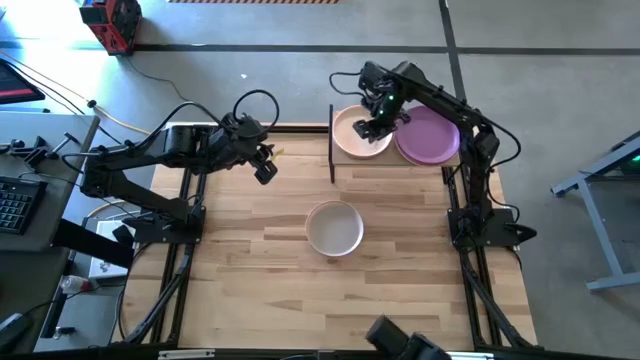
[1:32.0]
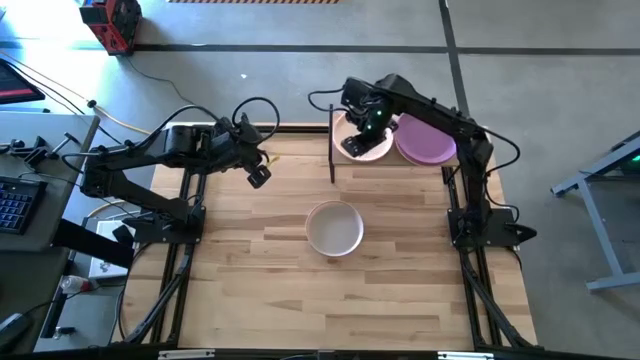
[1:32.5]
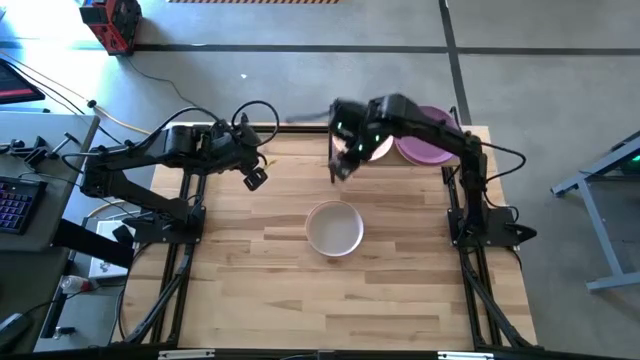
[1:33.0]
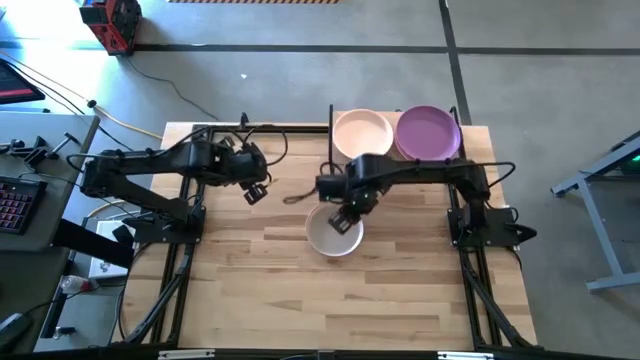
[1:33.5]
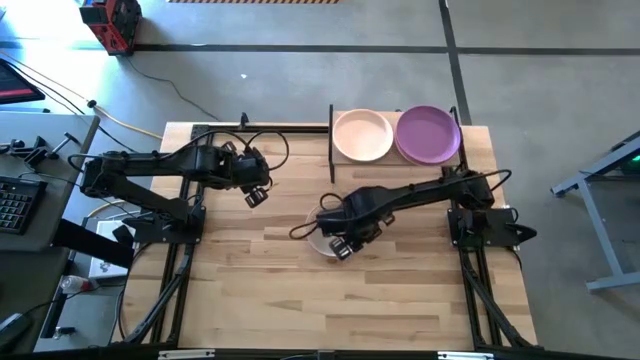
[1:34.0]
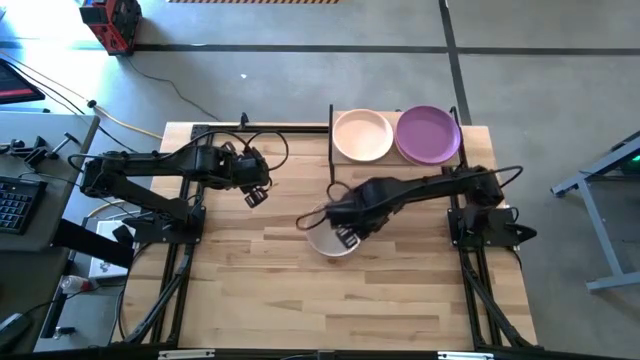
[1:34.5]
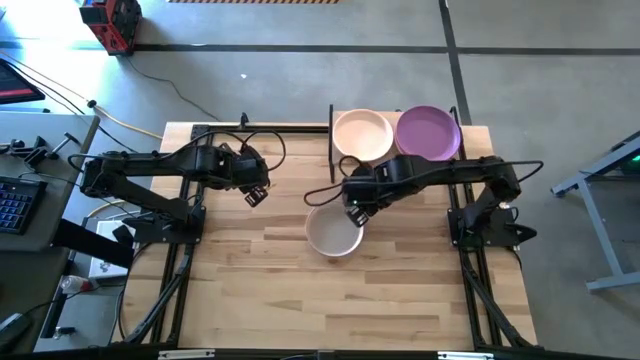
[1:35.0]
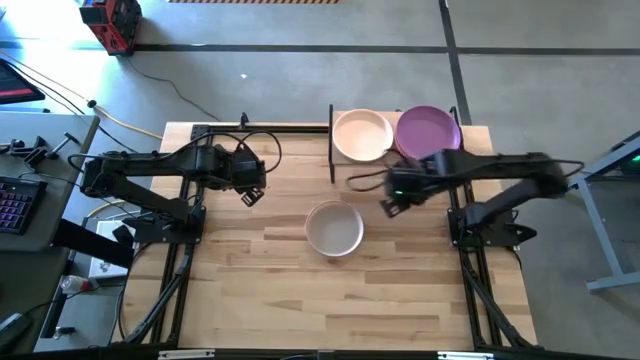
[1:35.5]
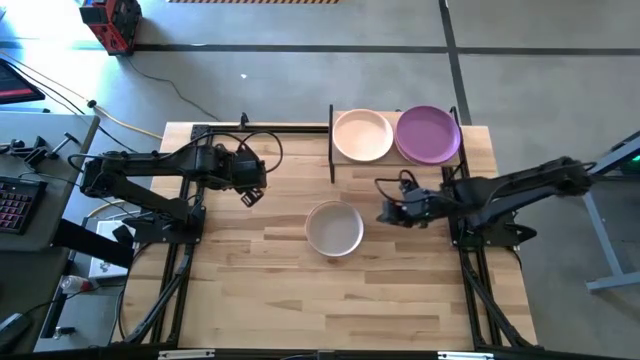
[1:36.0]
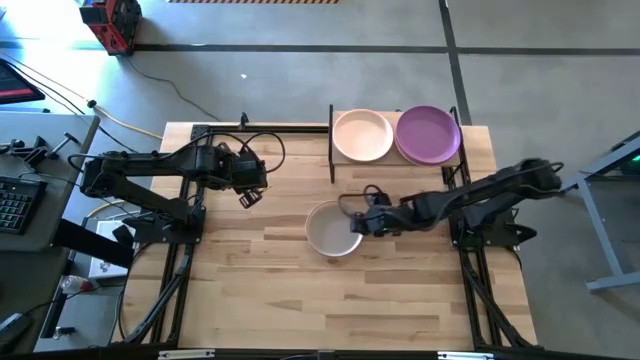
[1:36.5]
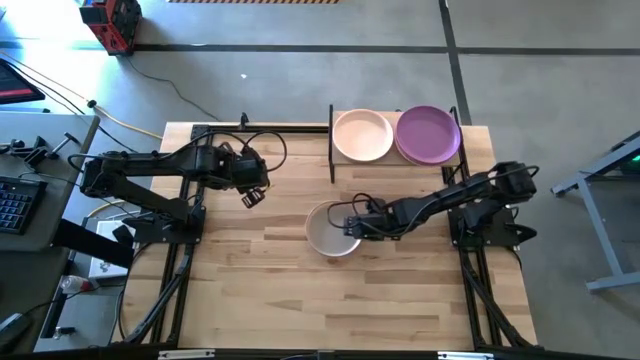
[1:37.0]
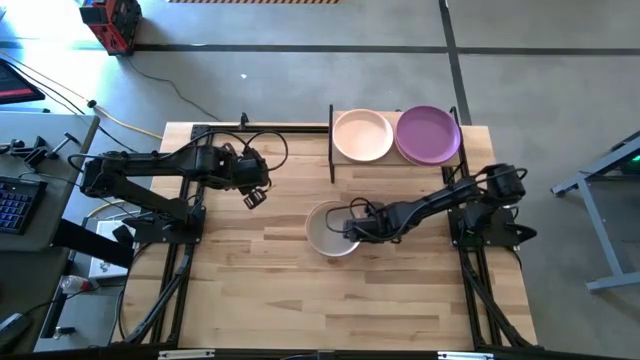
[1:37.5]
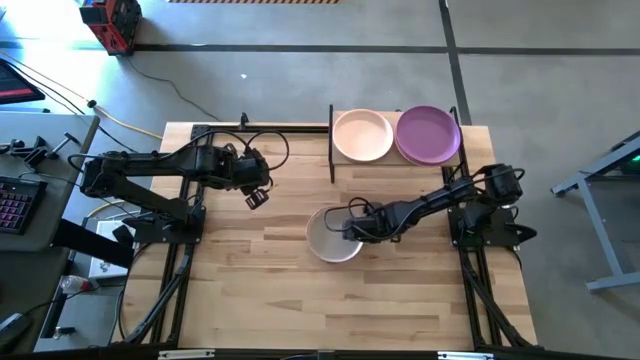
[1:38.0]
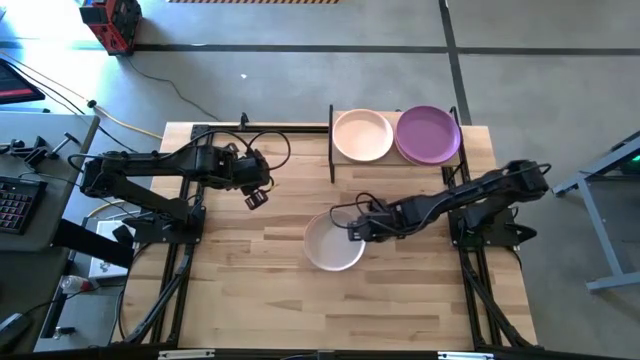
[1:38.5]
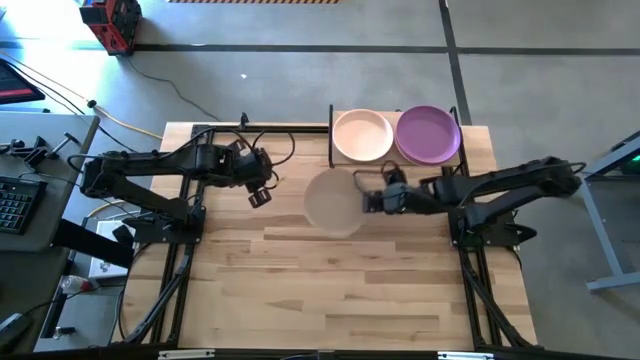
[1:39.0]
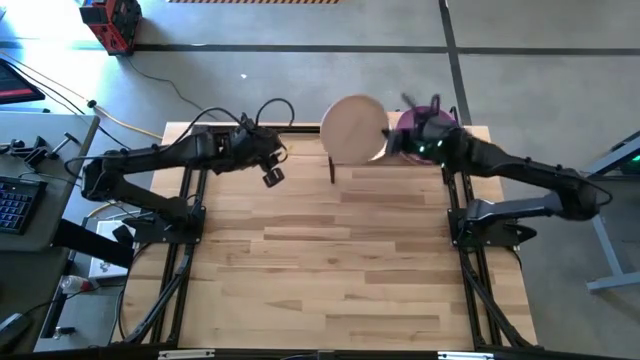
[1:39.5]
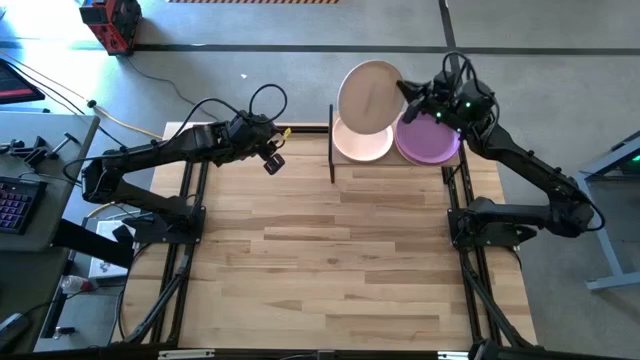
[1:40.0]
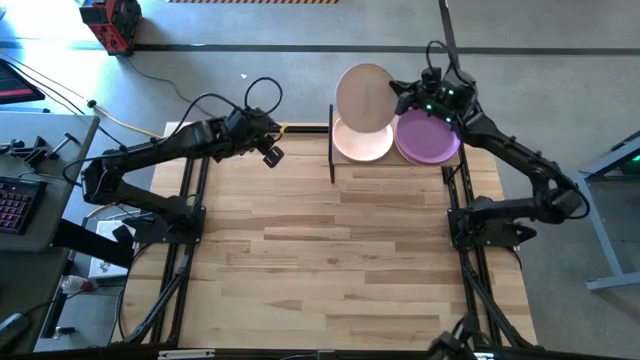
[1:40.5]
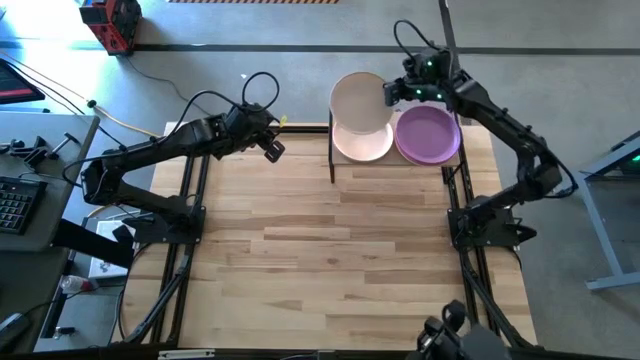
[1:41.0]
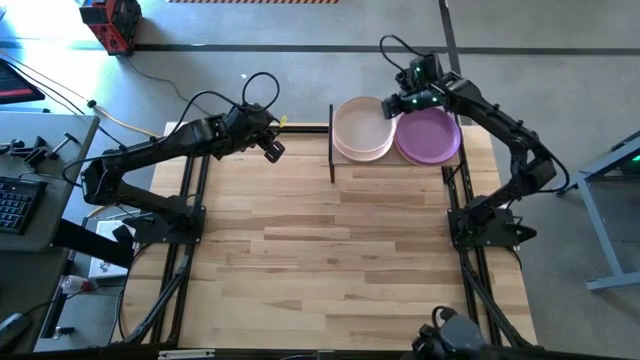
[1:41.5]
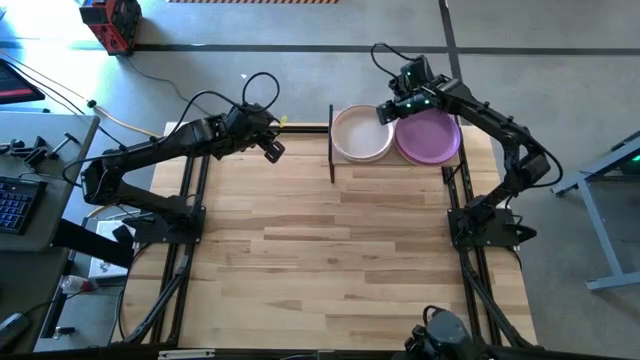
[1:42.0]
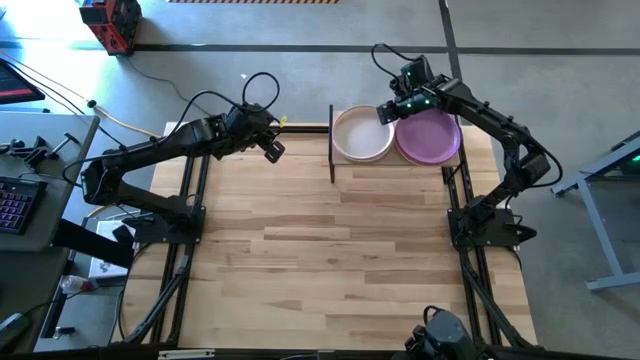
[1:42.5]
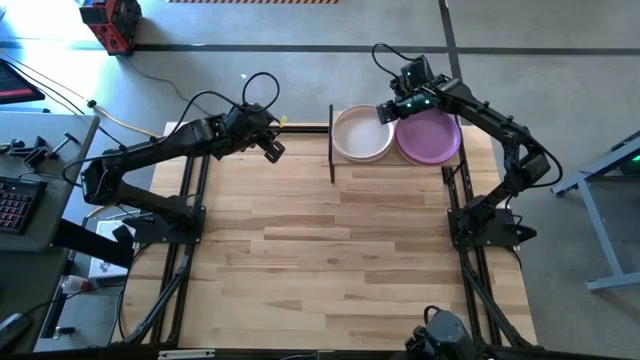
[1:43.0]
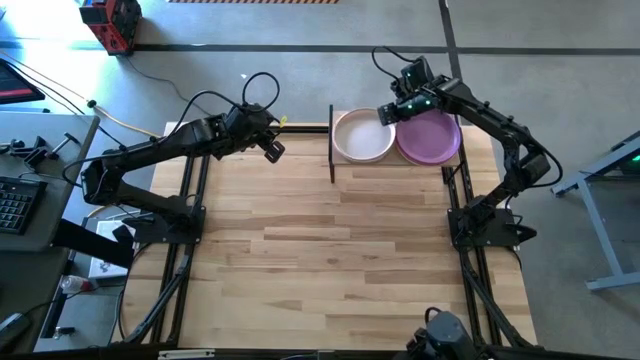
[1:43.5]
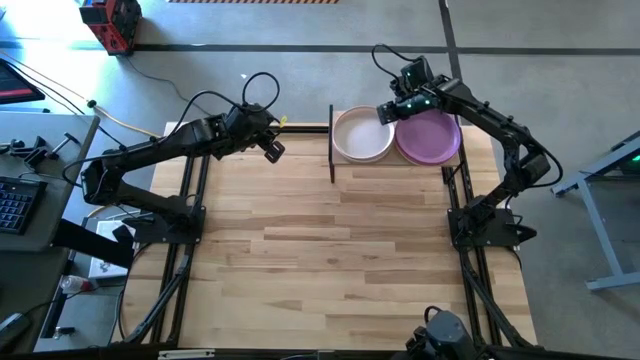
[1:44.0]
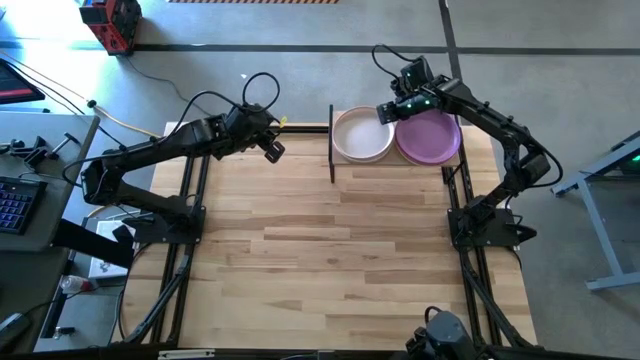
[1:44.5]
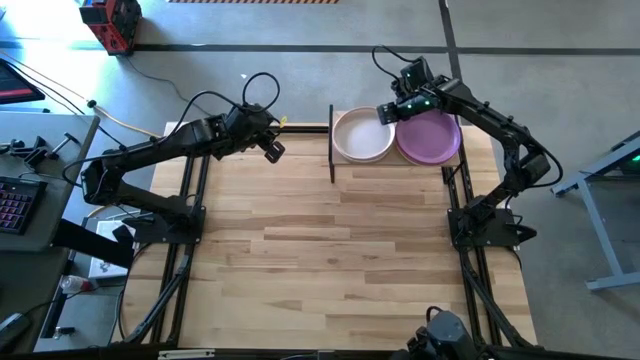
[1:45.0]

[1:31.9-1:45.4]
Task: Place and stack plates onto a shelf
Stack the gray plate on top of the light orange plate on the shelf

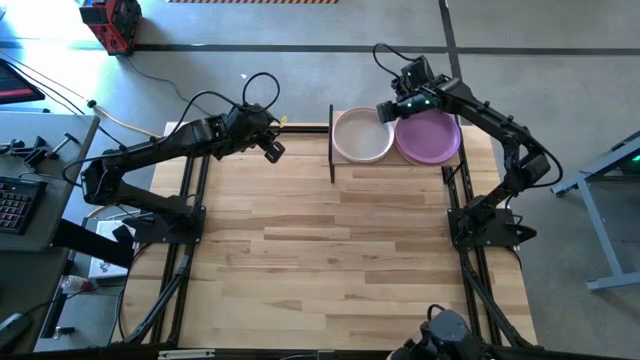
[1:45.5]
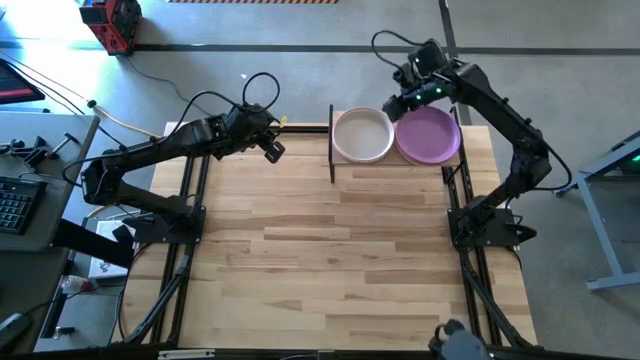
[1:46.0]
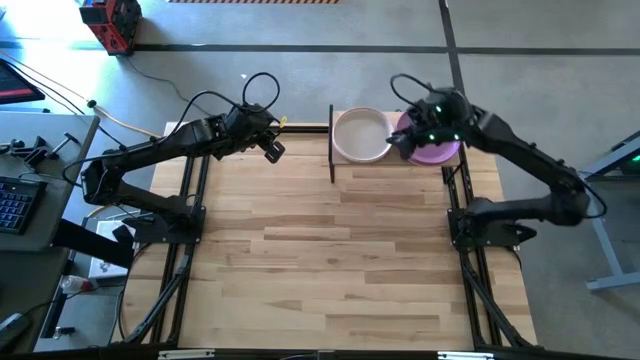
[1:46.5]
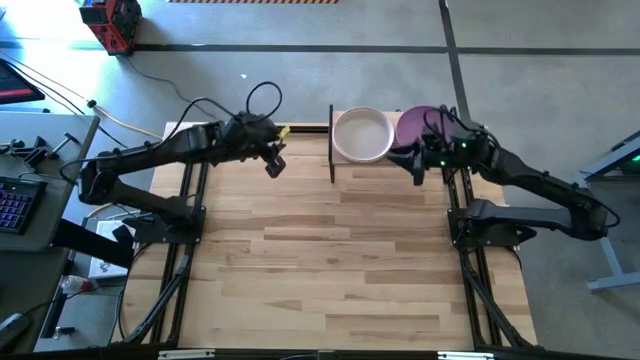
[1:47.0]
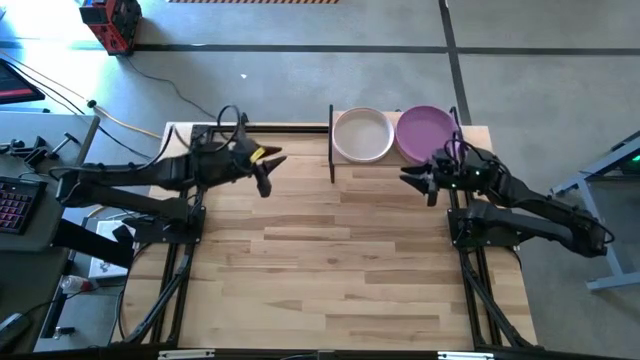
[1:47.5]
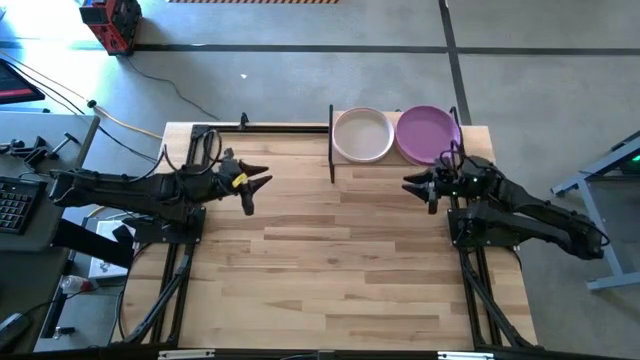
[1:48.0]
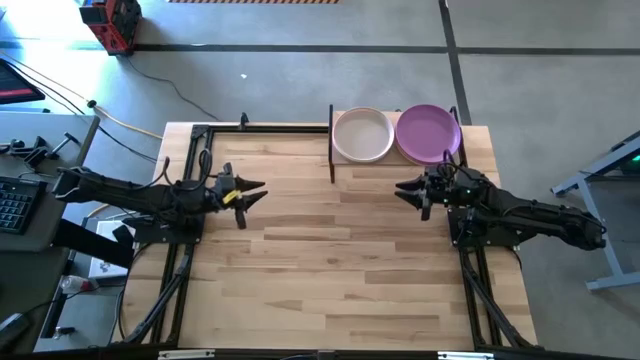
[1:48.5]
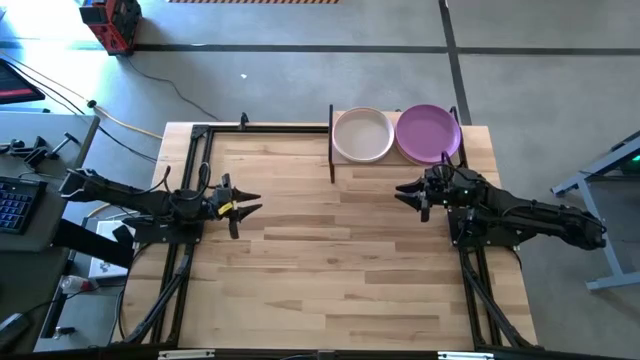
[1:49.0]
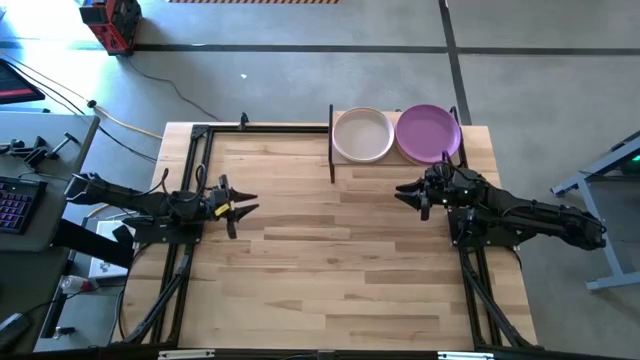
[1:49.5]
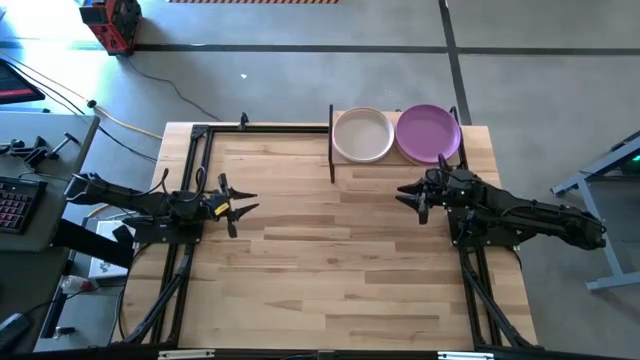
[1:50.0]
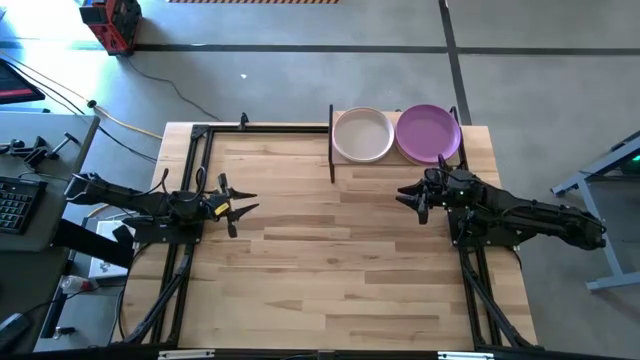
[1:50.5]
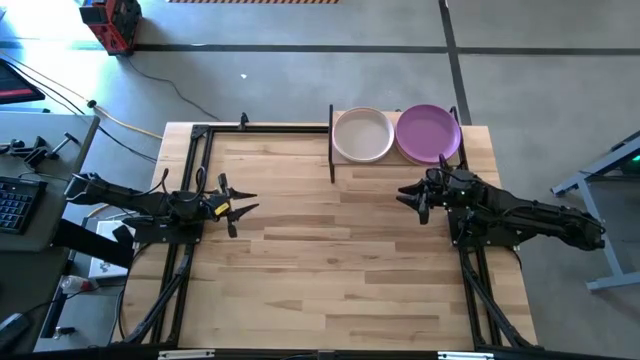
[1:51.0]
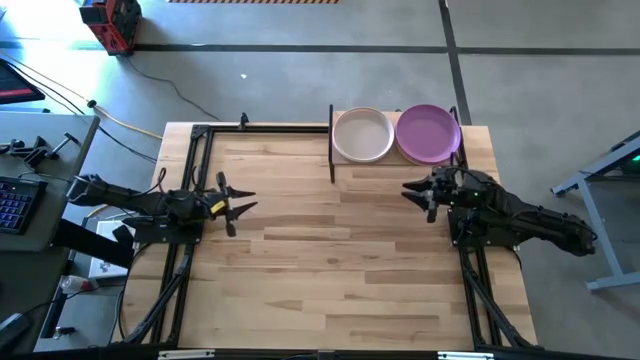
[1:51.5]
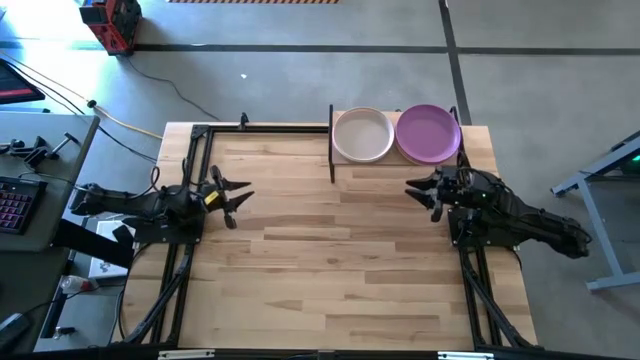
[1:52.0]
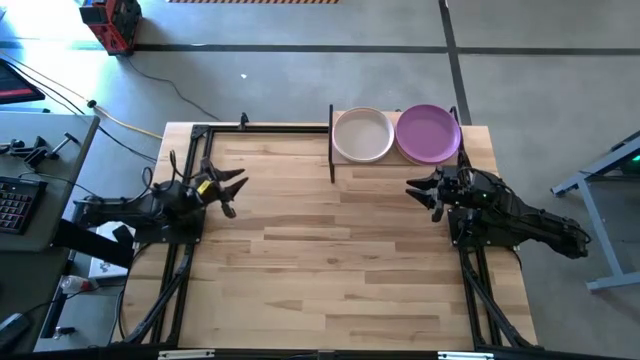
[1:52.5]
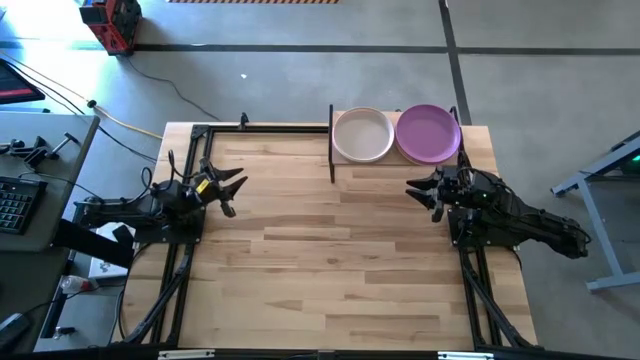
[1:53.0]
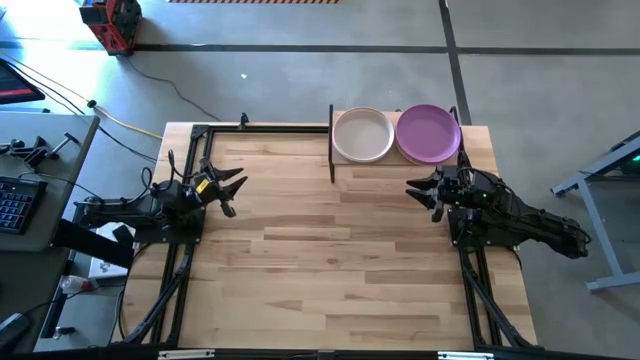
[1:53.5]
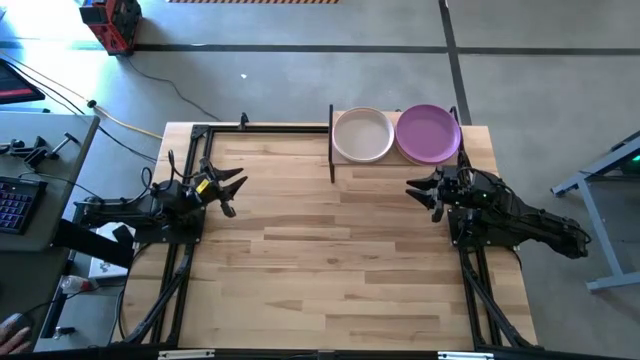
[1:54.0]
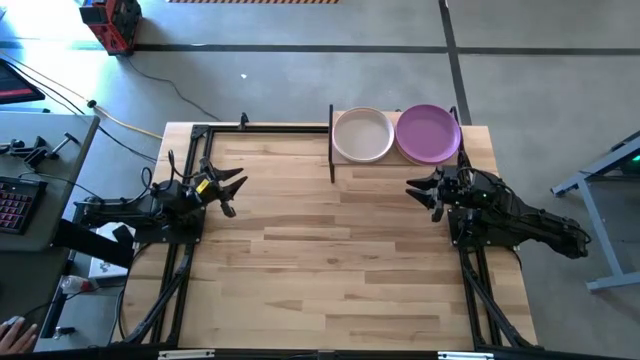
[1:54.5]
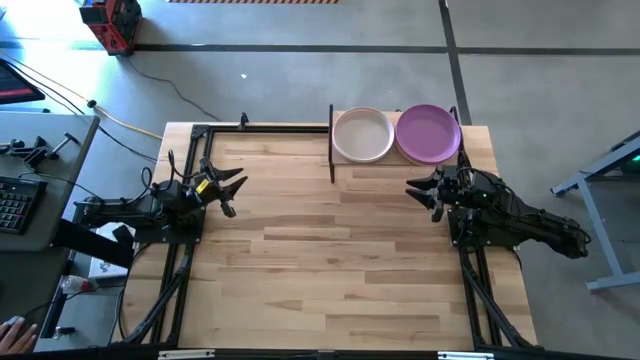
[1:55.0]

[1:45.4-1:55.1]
Return to Home Position
